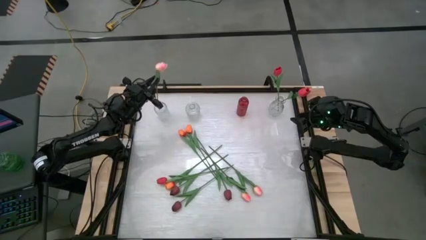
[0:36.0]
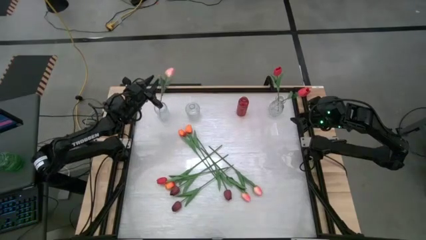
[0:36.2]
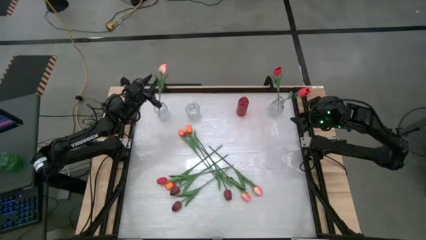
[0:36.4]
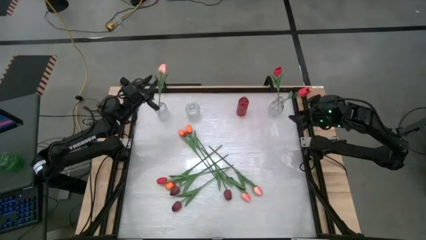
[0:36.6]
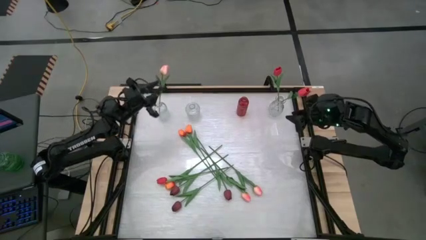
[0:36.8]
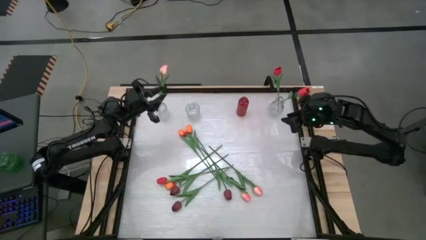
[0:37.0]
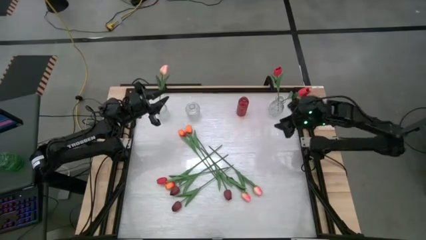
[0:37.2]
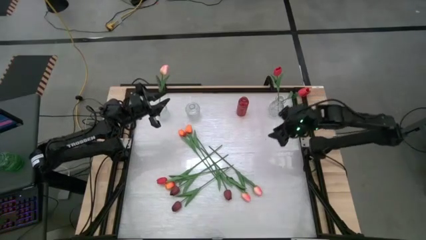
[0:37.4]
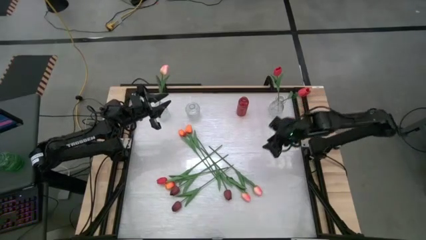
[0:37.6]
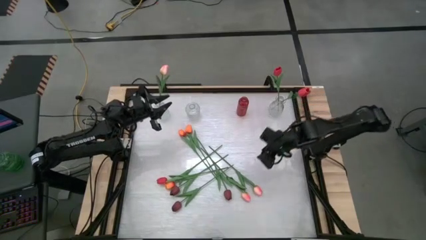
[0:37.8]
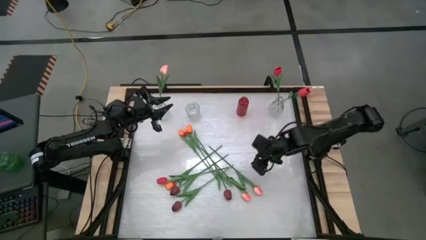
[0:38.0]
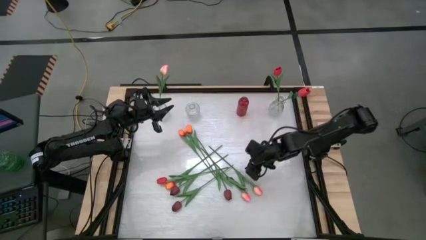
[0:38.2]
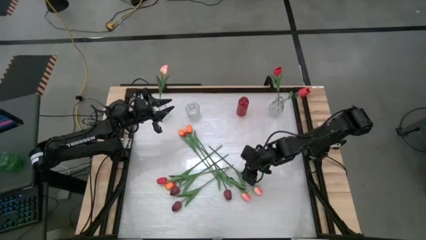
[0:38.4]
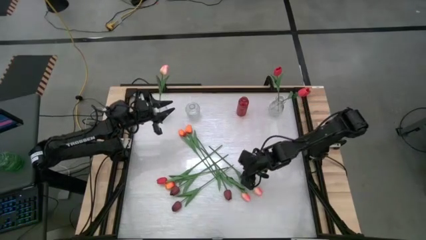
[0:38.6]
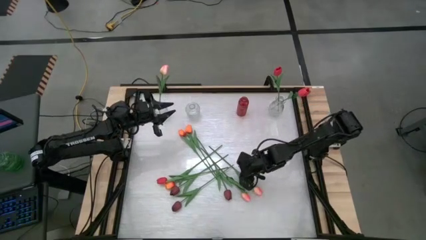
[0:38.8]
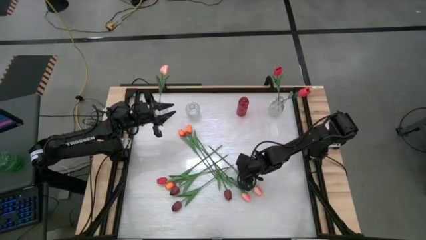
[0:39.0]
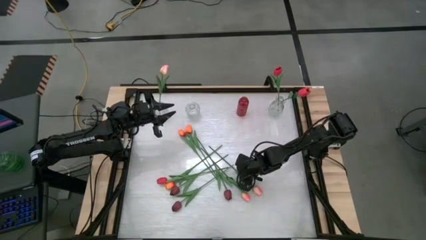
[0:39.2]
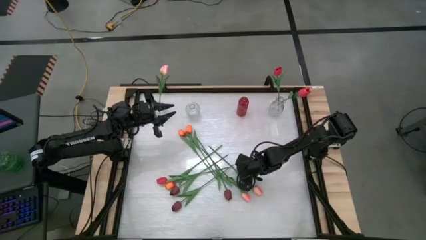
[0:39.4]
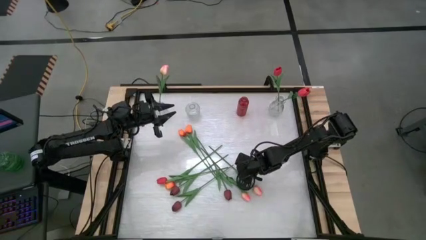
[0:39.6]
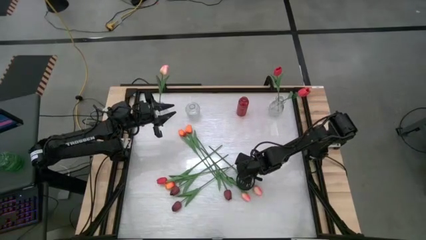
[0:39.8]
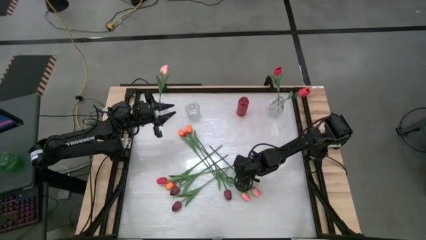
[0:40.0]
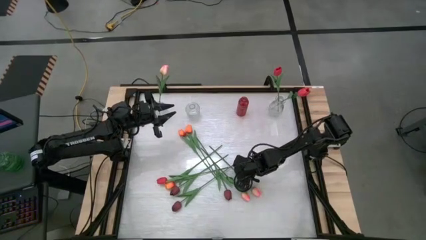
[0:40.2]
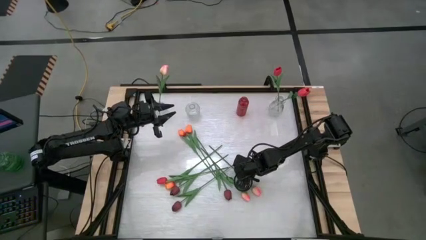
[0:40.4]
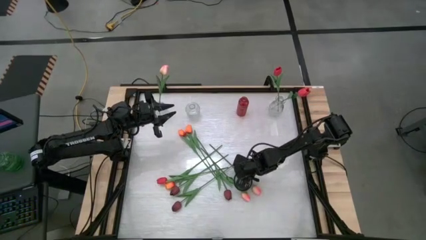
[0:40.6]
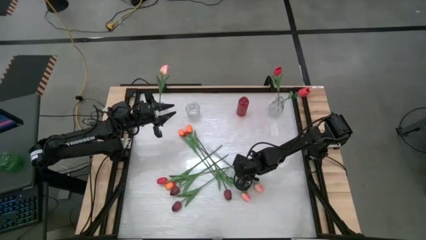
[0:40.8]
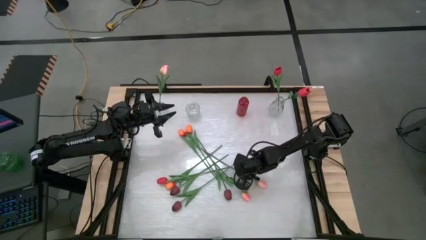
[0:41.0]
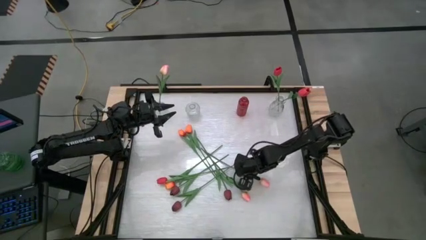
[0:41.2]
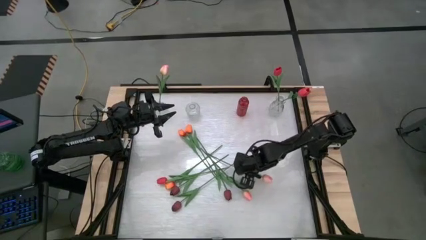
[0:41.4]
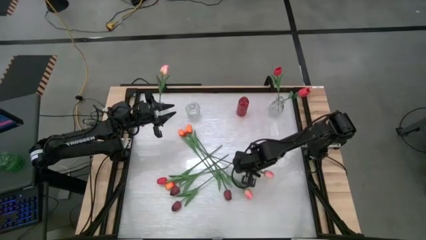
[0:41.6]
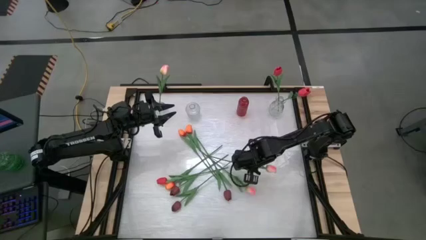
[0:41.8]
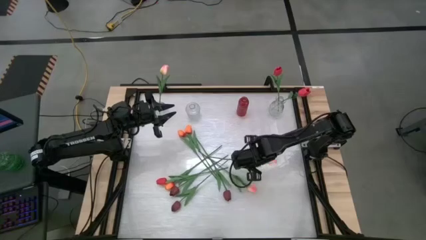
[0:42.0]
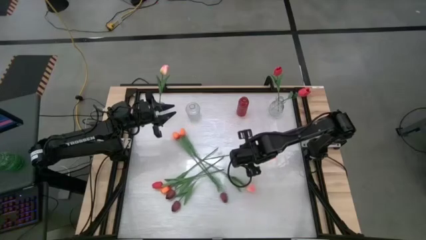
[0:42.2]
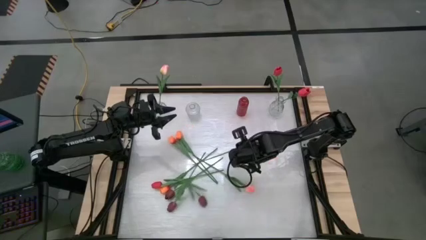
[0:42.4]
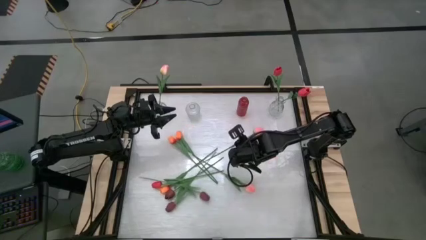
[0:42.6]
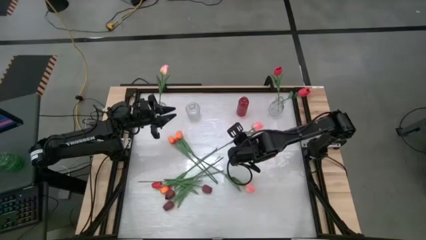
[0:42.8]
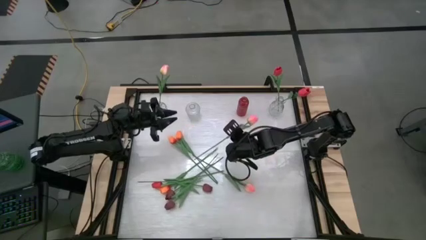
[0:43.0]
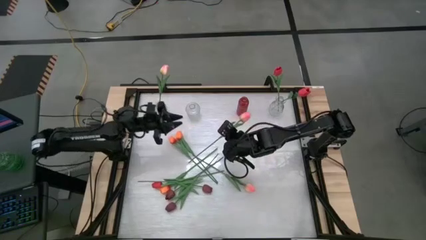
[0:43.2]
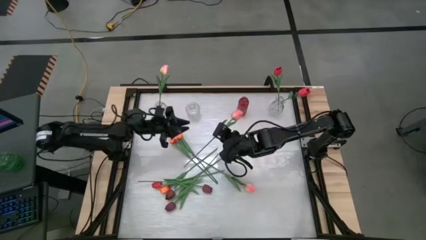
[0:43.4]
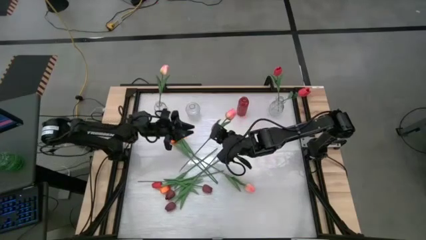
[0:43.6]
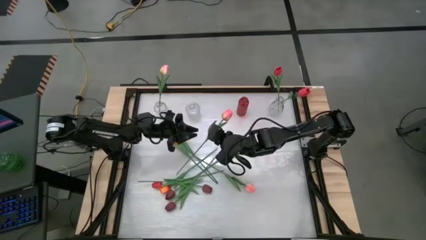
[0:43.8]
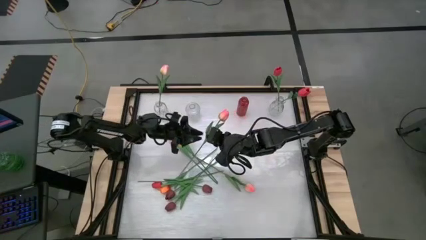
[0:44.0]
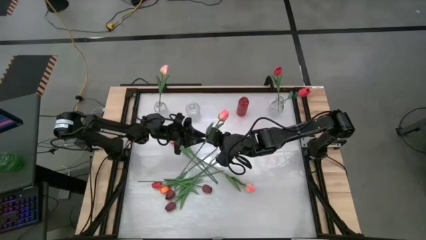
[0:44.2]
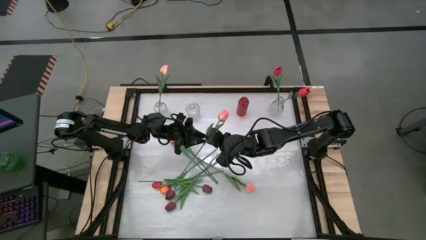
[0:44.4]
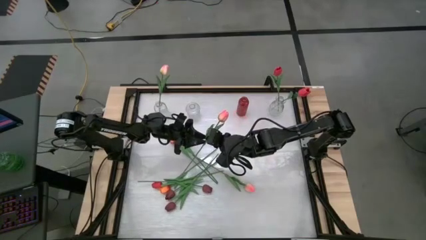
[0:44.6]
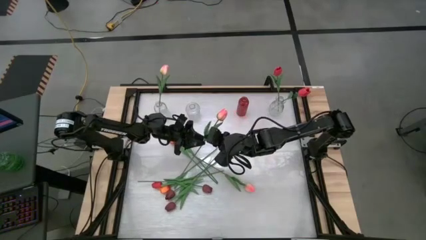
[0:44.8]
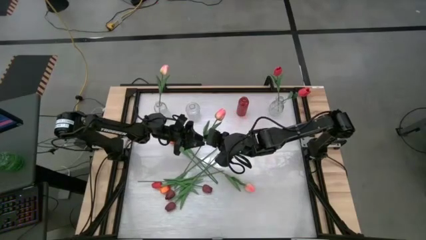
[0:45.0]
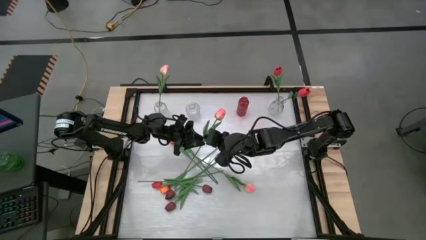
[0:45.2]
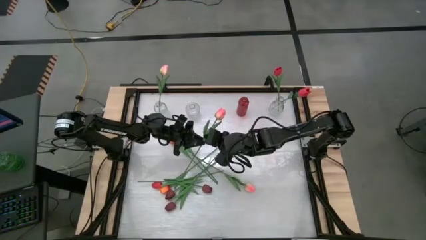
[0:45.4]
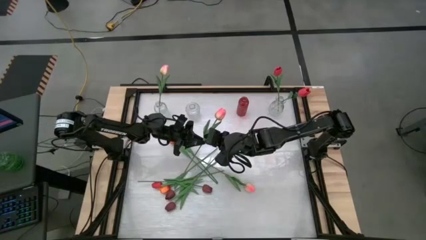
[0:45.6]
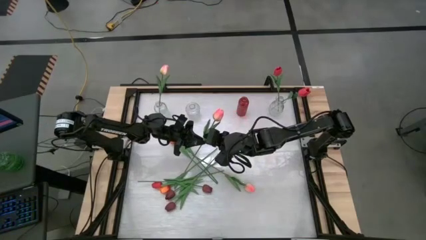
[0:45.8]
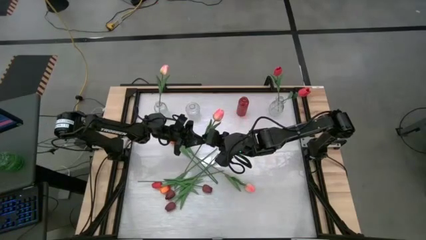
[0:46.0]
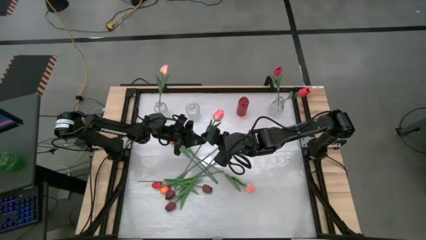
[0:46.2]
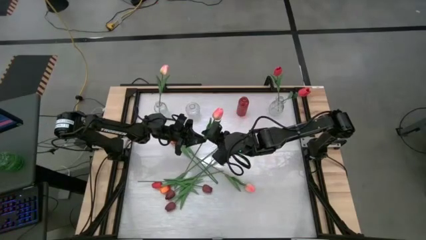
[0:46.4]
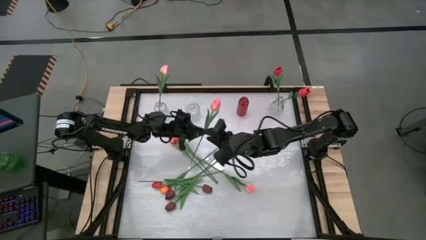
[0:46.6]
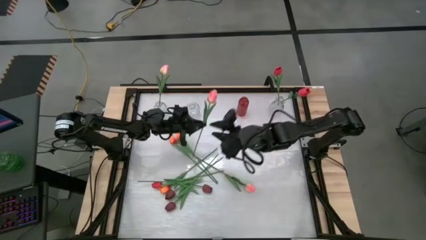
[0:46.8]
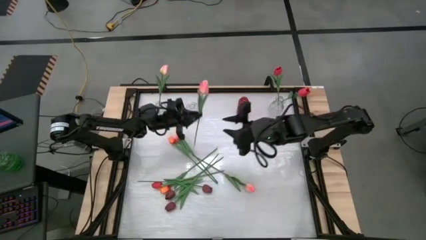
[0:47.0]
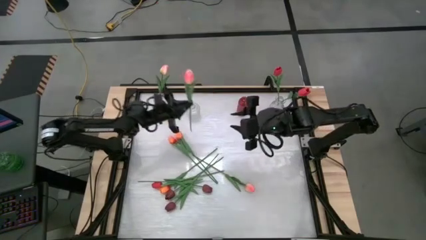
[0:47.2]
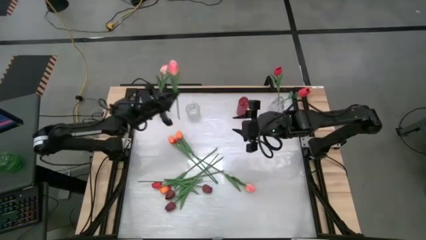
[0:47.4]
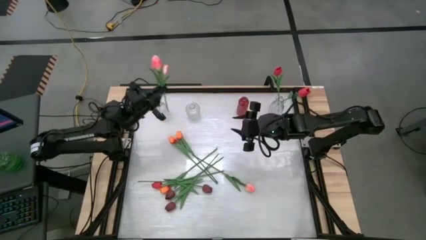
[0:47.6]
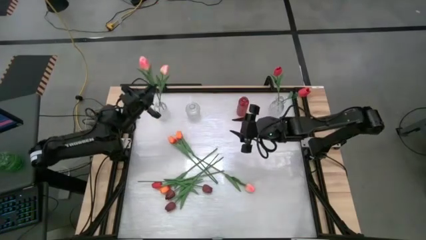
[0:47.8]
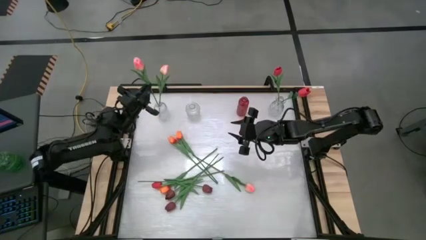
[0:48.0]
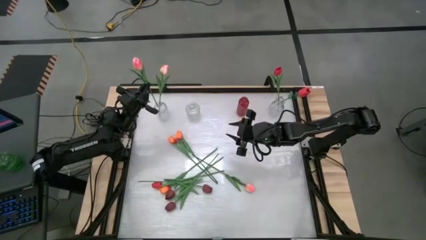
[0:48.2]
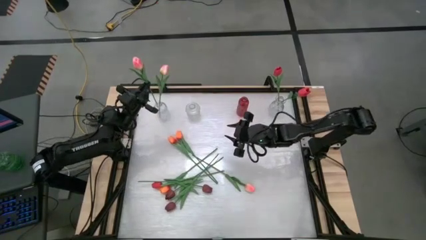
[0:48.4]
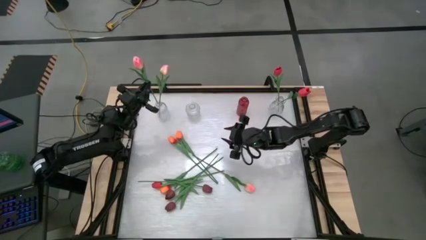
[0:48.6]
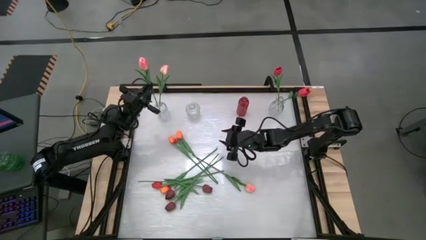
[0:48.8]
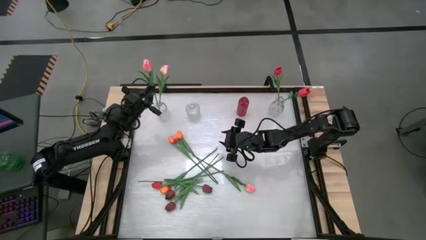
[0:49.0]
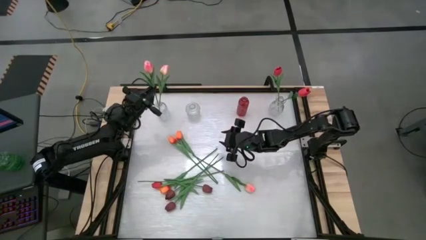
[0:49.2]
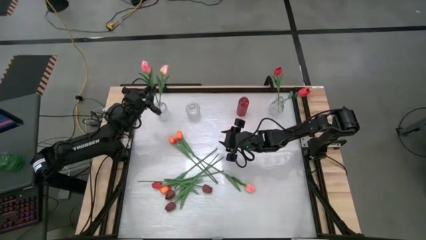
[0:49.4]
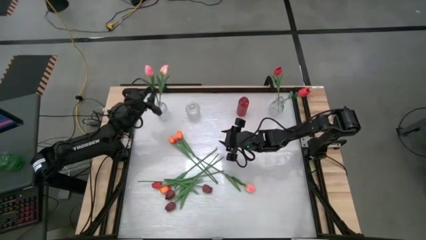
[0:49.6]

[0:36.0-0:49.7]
Task: Sort flowers into vase by color
Put the white-pink flower into the left transparent vase
